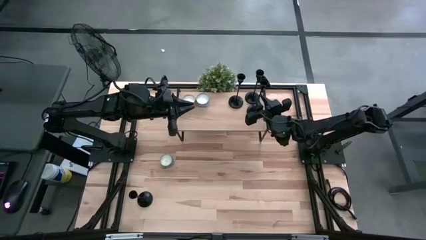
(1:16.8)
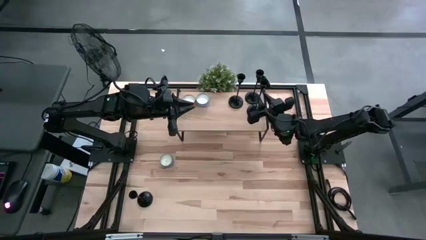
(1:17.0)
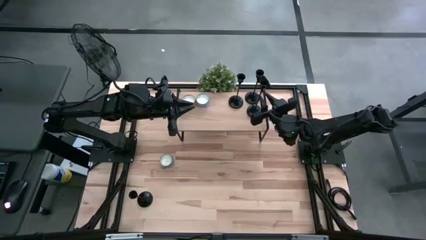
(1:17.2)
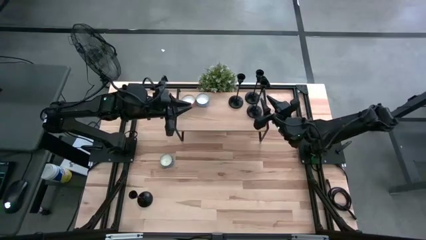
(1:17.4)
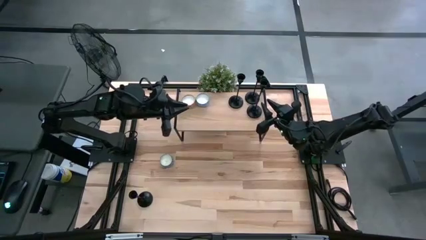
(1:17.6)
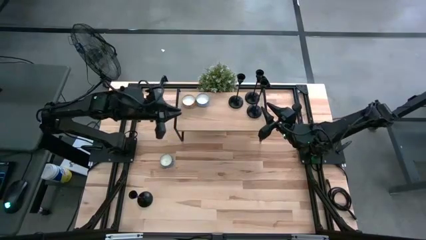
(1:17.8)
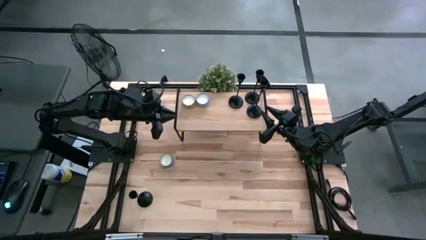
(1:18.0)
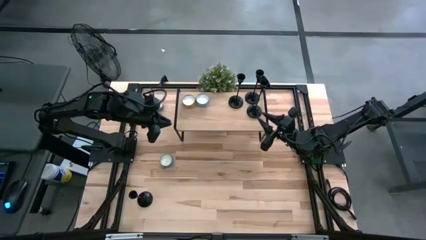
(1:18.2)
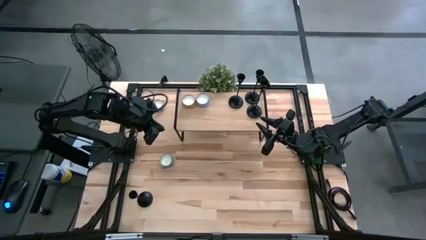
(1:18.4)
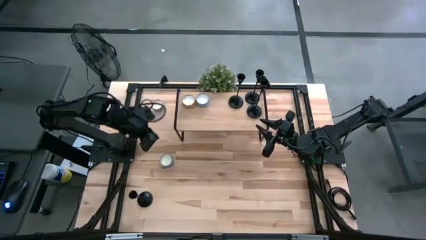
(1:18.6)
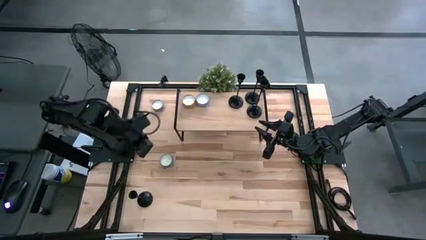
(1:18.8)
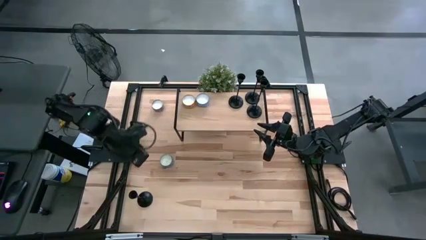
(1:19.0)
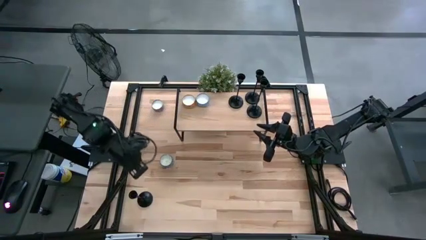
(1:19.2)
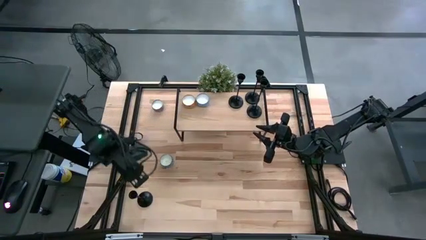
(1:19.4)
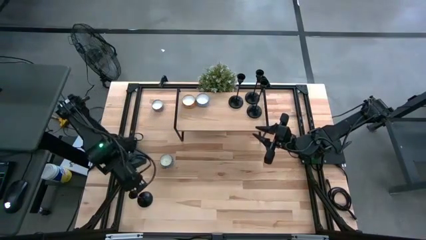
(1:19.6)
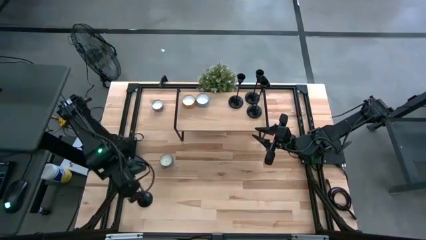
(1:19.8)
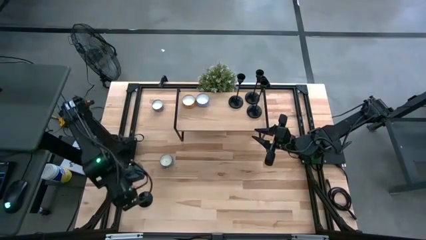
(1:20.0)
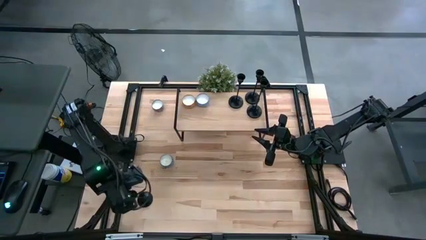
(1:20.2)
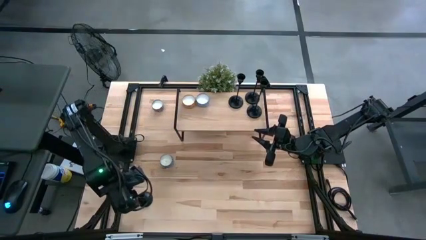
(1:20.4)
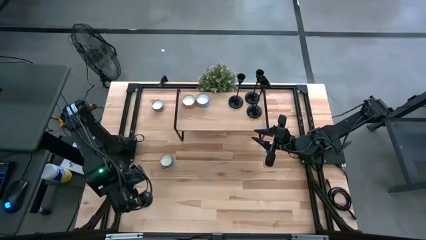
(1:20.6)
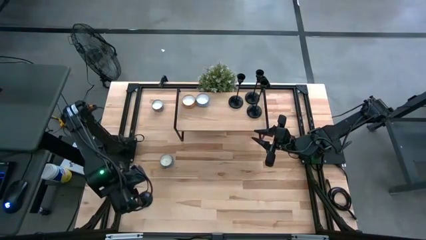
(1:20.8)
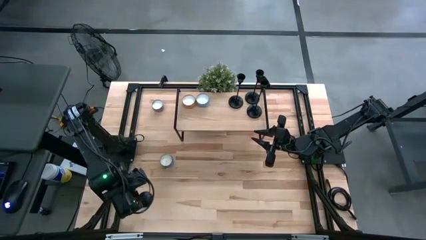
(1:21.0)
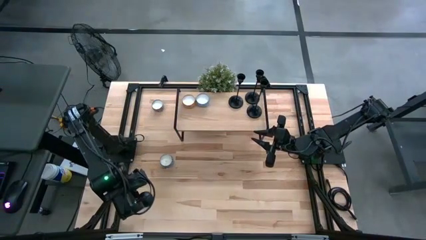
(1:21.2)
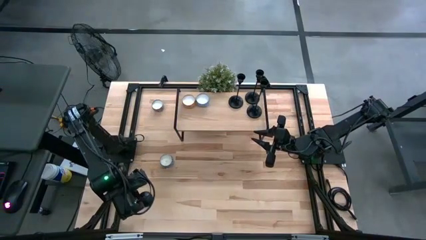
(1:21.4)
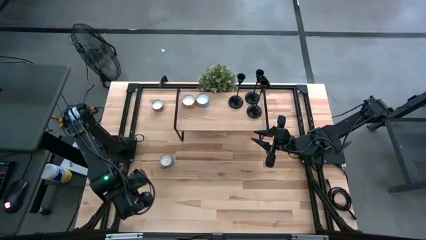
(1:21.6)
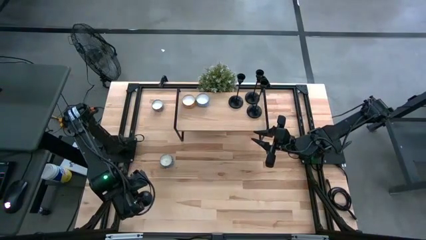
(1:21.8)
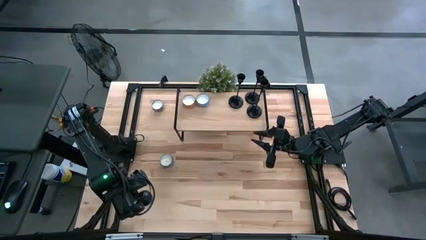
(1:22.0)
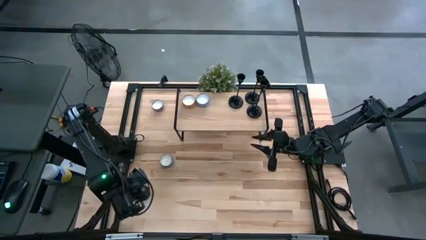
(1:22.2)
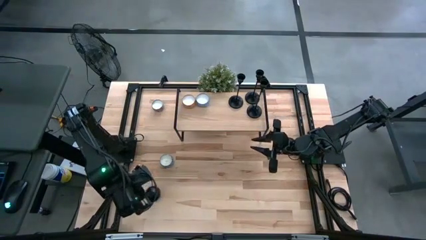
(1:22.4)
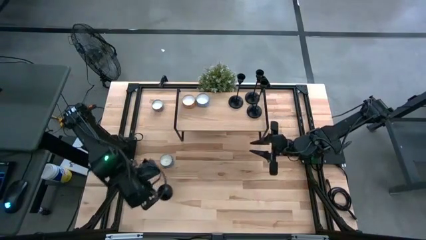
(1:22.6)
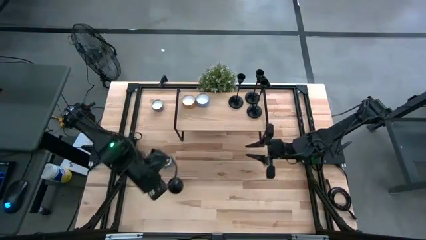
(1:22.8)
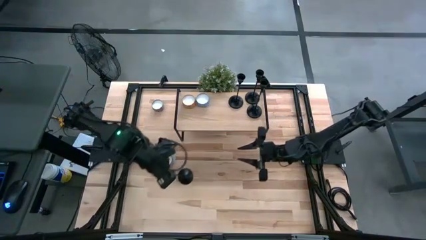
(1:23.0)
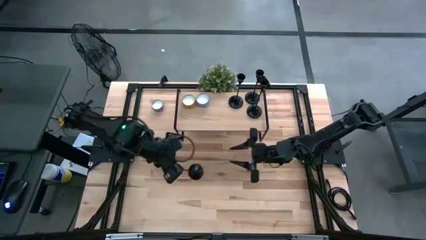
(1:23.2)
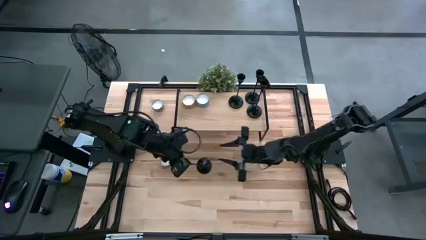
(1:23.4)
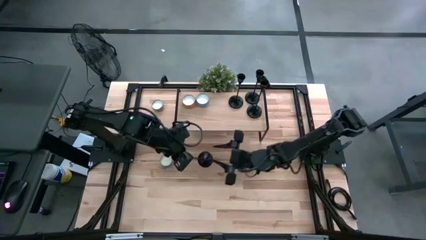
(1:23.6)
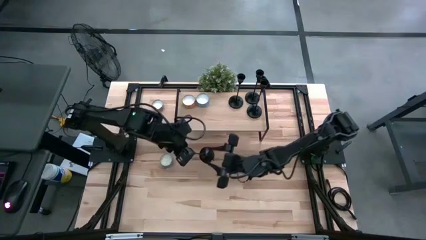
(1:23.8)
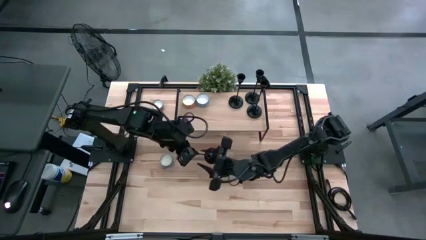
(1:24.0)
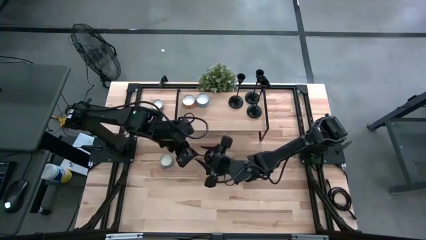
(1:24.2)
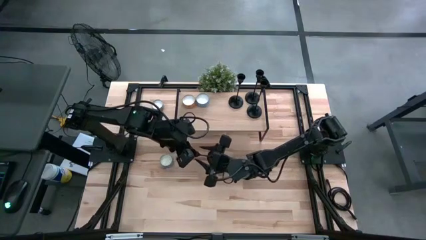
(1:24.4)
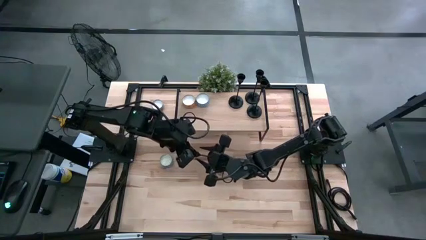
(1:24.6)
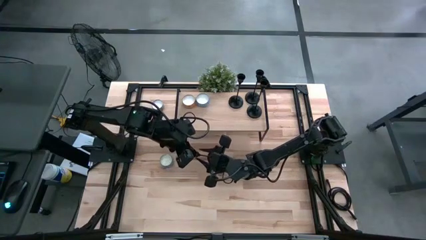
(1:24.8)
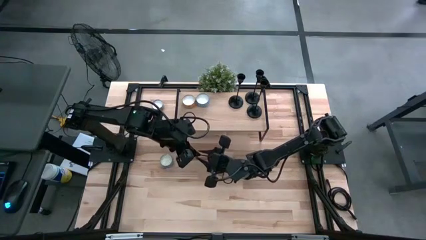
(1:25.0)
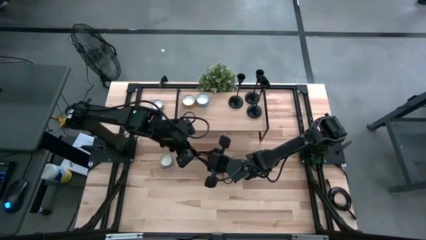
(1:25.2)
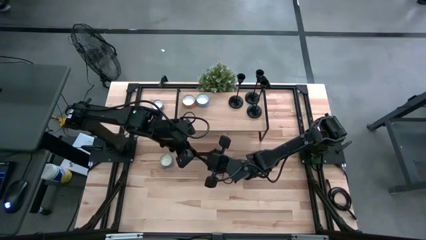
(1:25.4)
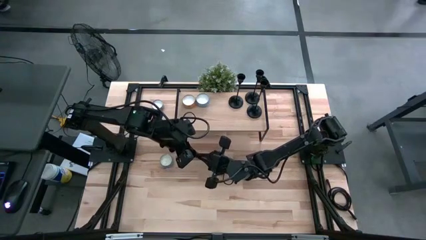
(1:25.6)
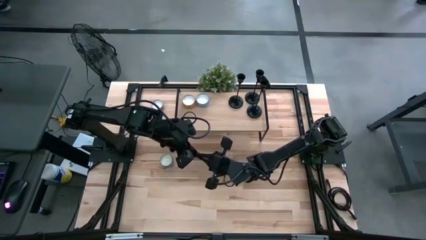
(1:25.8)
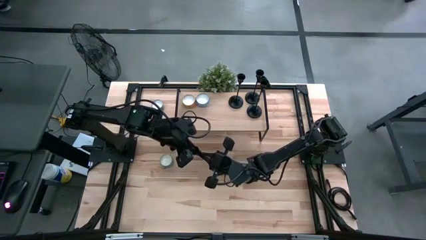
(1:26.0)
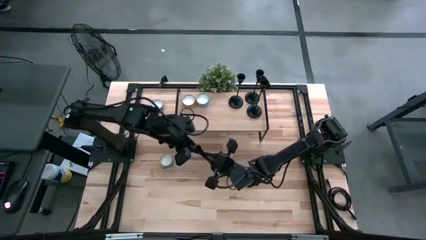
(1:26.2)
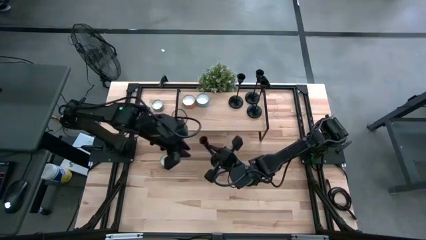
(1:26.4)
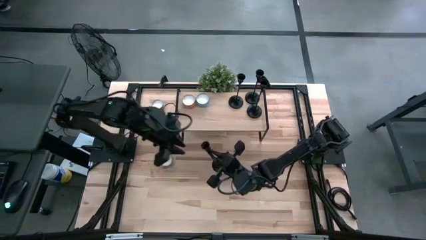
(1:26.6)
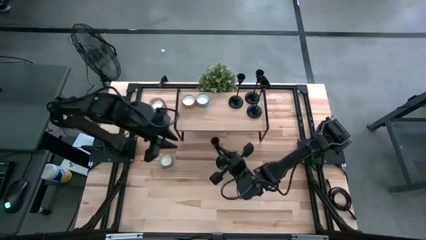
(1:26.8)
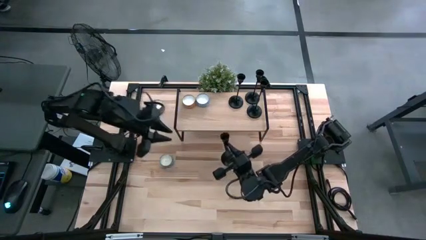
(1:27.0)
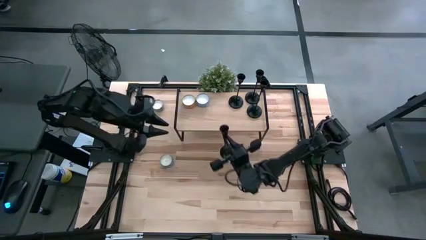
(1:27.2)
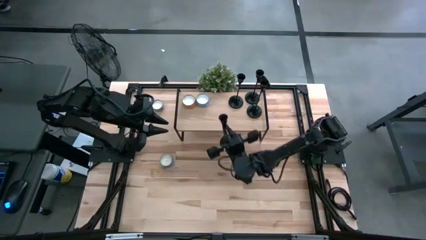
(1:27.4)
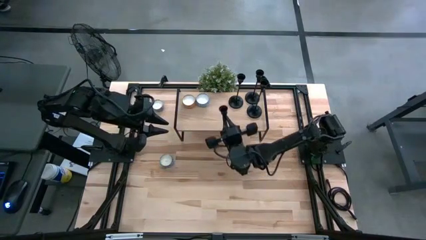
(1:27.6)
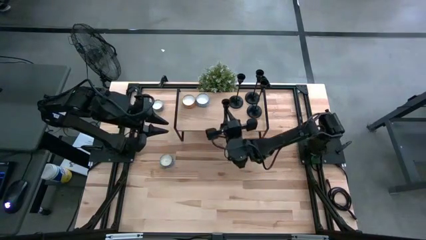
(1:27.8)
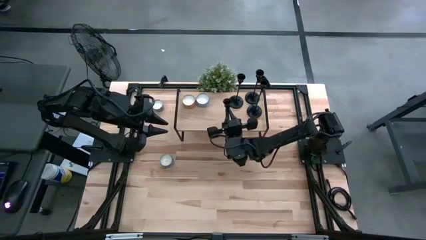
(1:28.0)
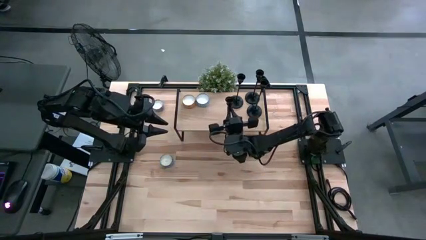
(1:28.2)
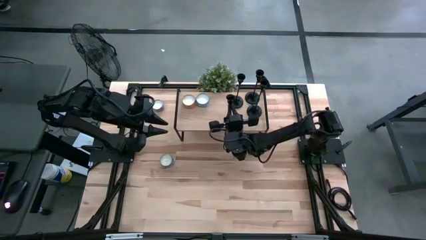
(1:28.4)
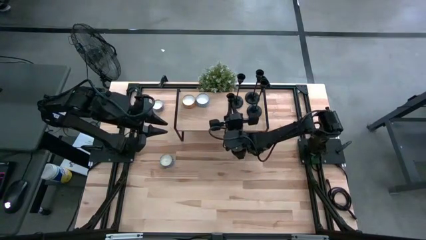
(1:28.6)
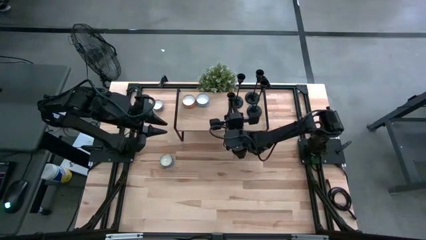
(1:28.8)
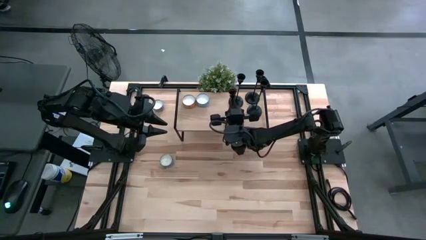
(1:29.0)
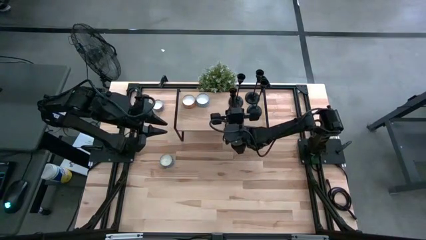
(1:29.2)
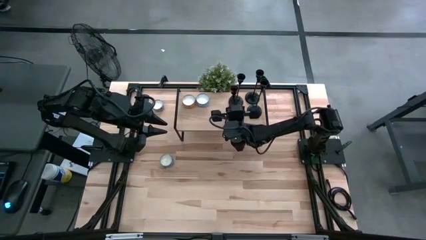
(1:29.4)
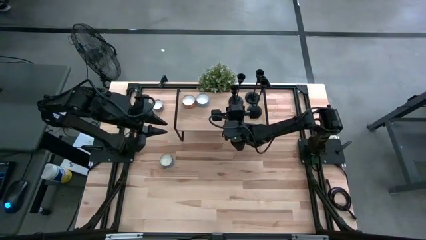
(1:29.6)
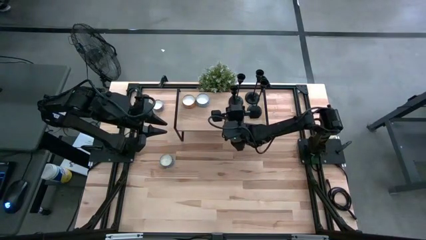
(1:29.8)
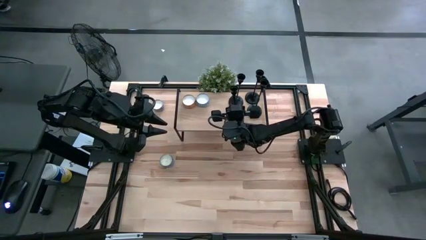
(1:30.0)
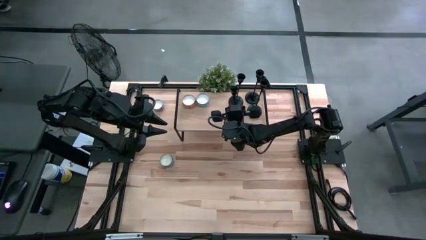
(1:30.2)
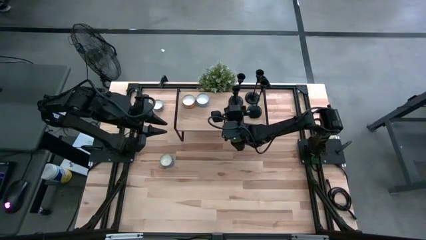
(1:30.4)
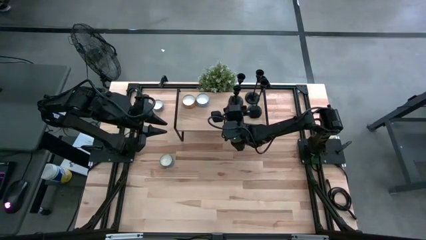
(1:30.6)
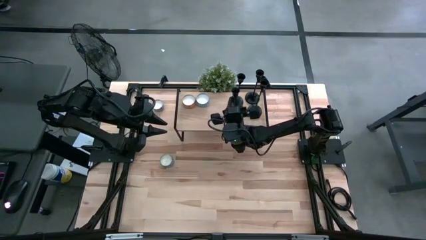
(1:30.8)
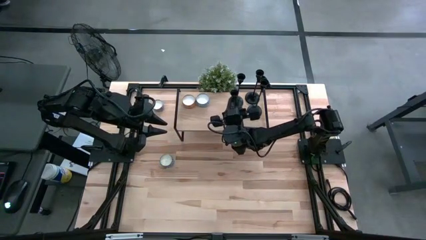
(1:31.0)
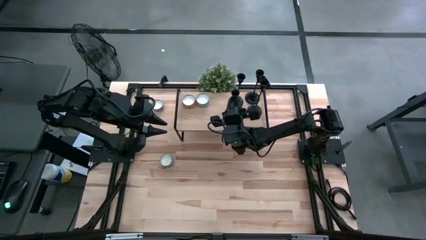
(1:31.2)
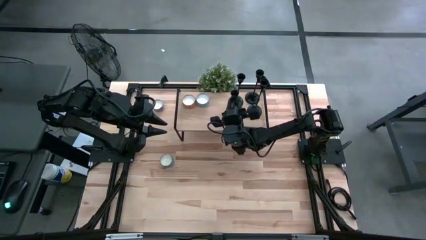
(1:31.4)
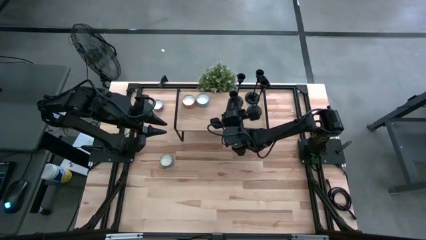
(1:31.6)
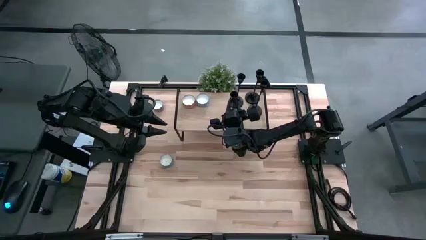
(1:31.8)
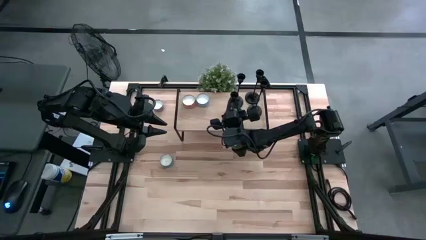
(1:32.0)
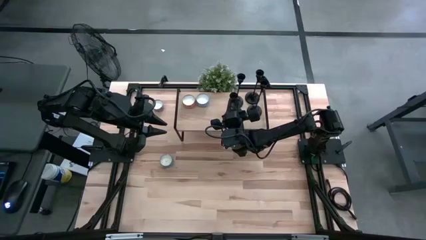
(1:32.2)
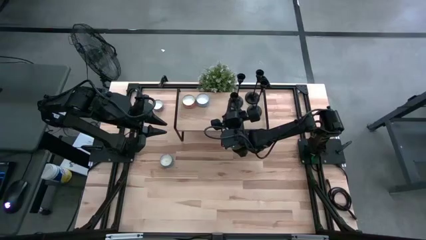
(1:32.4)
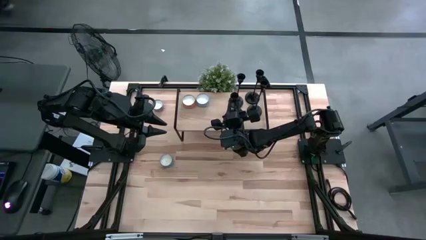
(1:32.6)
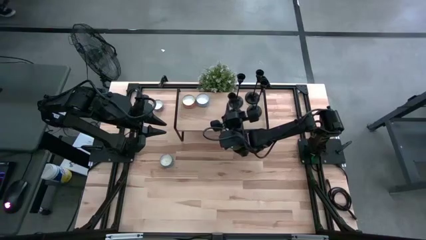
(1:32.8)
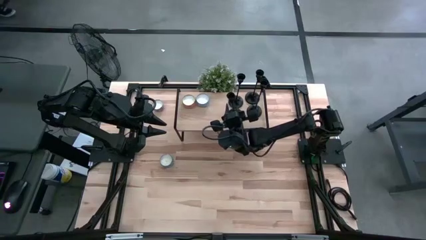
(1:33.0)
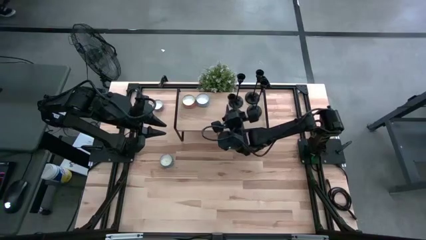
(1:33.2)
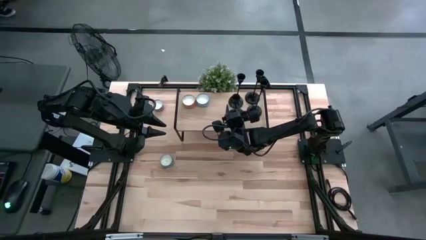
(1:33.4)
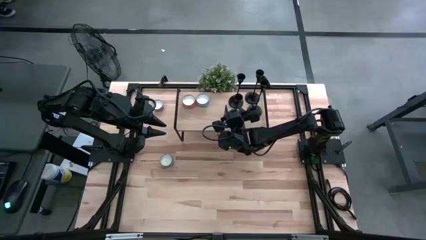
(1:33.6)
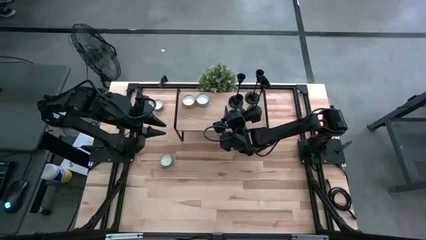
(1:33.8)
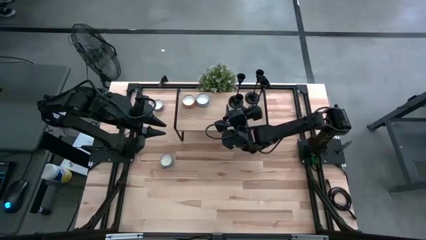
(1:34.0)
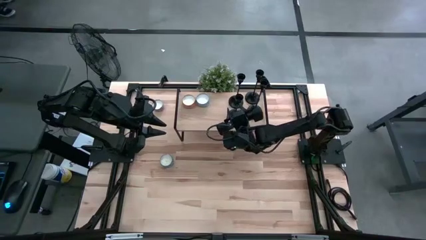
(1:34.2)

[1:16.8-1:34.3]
Task: Pick & Place candle stick holders
Put the black candle holder on the shelf aligned with the black candle holder
